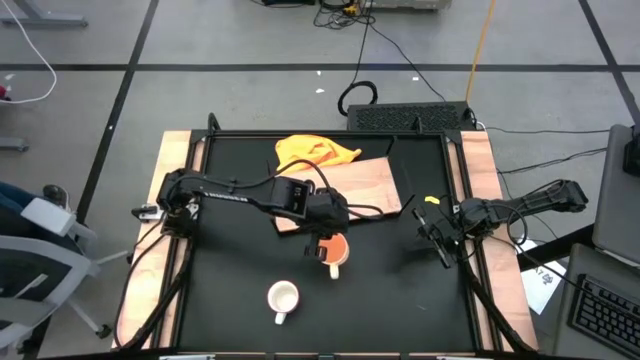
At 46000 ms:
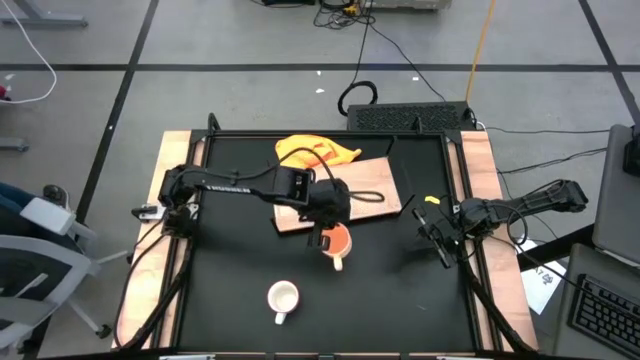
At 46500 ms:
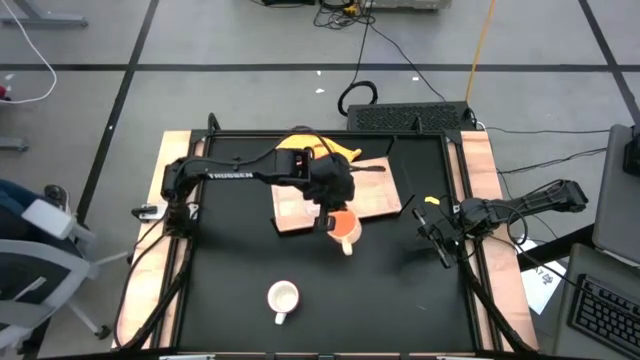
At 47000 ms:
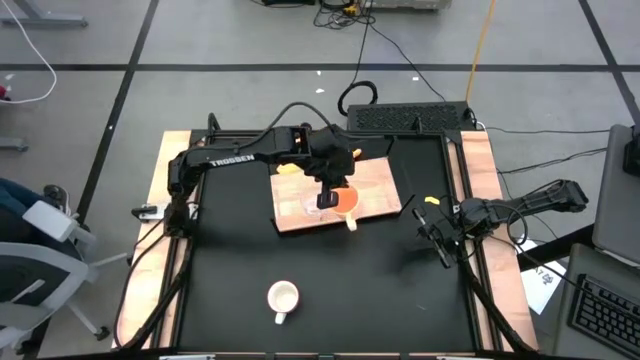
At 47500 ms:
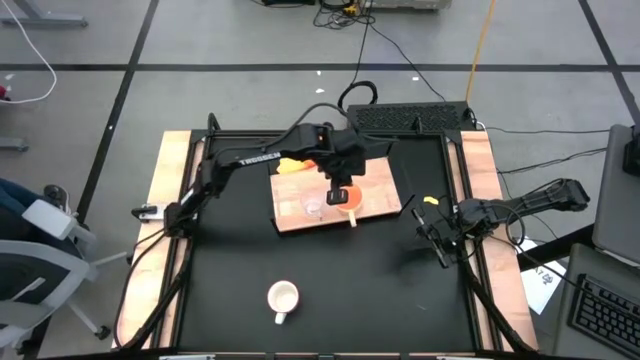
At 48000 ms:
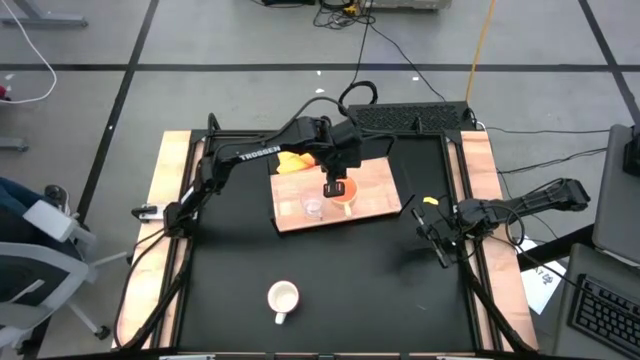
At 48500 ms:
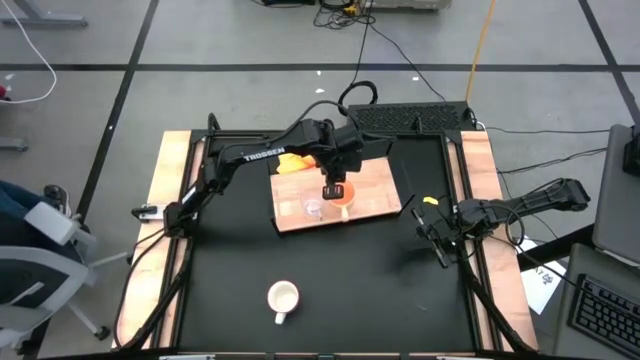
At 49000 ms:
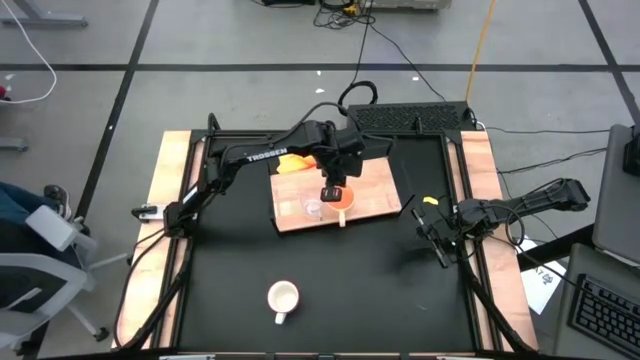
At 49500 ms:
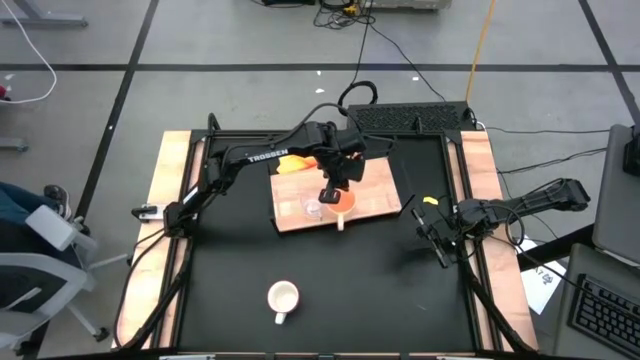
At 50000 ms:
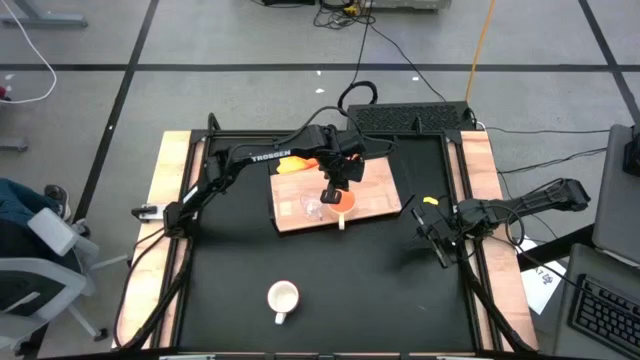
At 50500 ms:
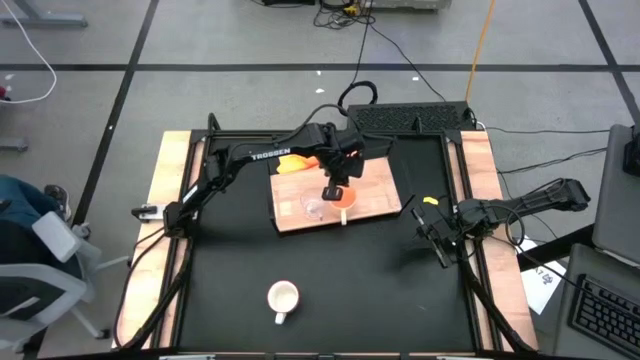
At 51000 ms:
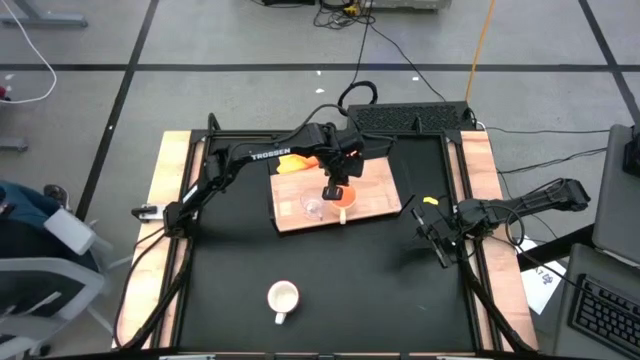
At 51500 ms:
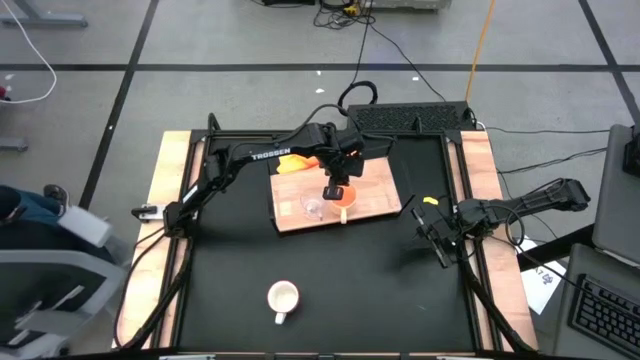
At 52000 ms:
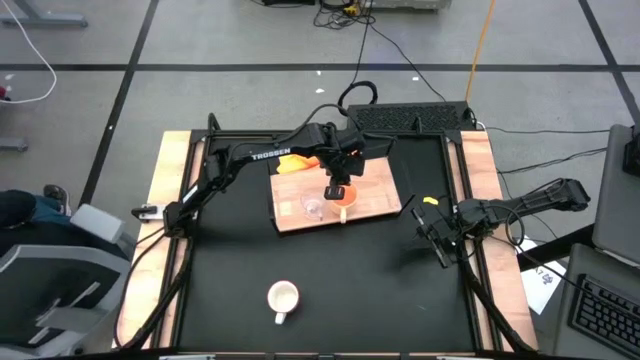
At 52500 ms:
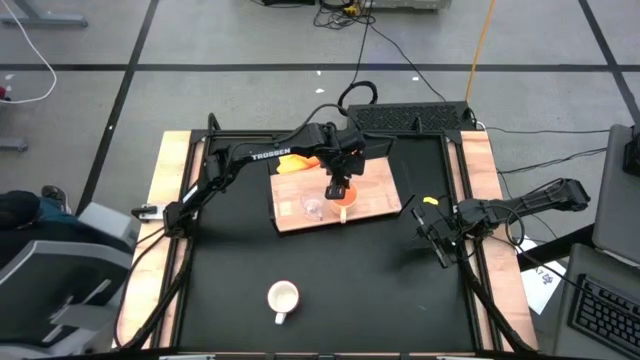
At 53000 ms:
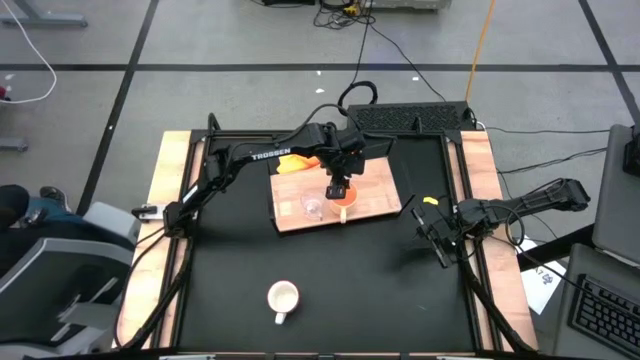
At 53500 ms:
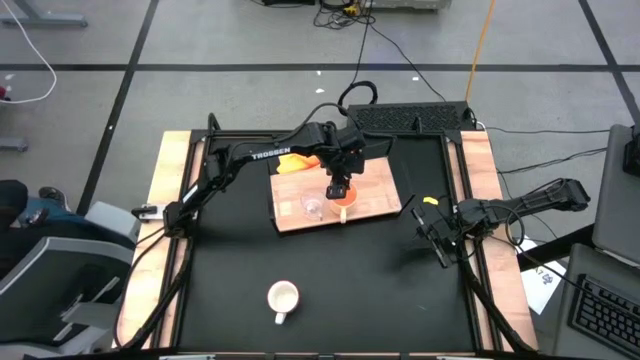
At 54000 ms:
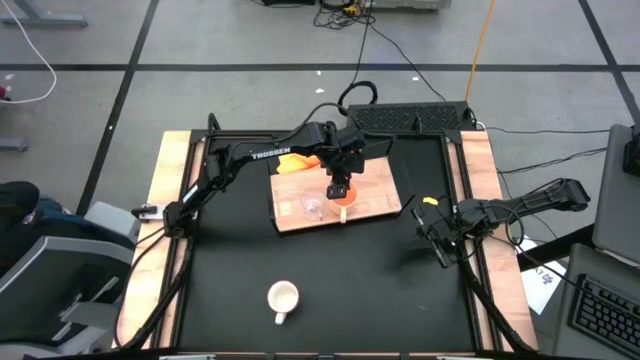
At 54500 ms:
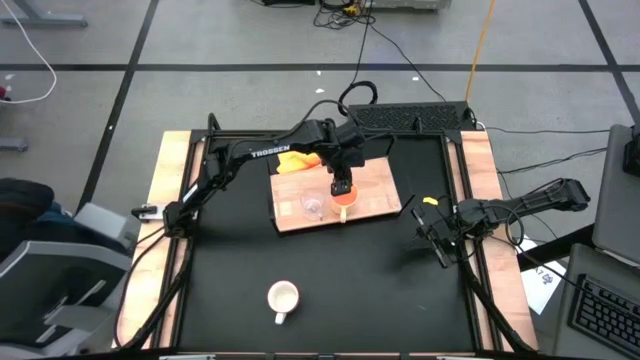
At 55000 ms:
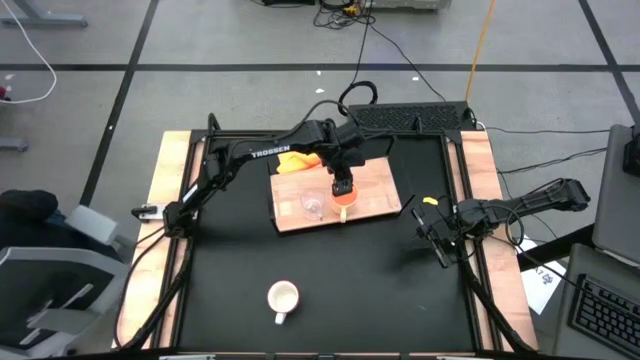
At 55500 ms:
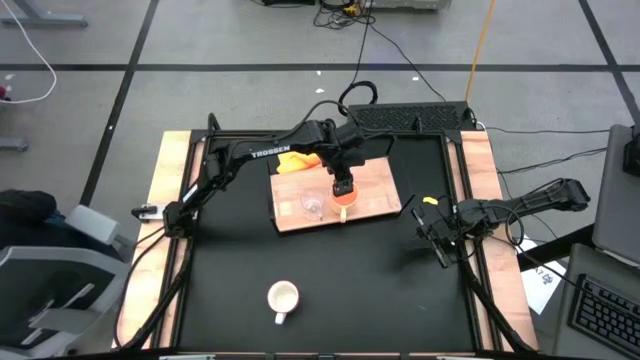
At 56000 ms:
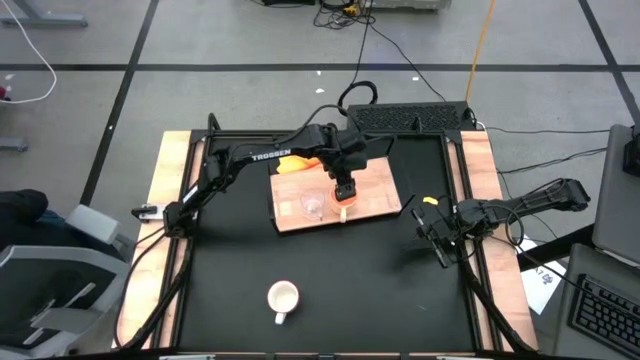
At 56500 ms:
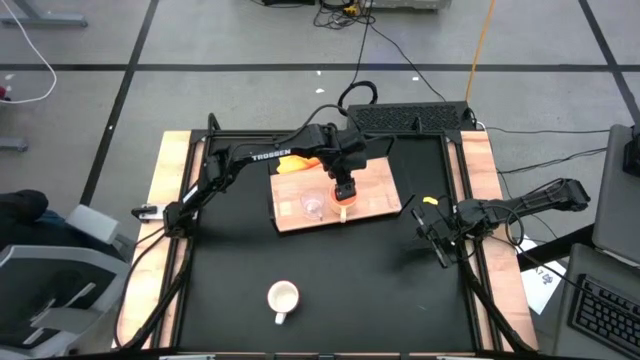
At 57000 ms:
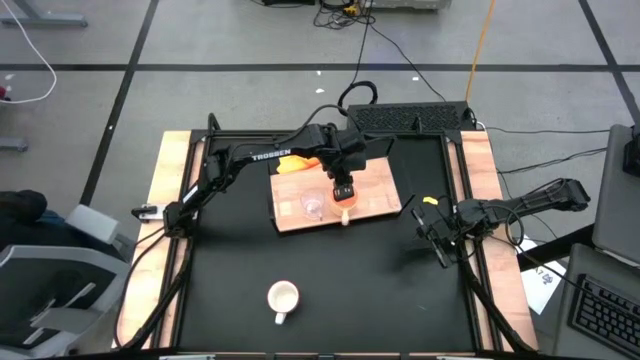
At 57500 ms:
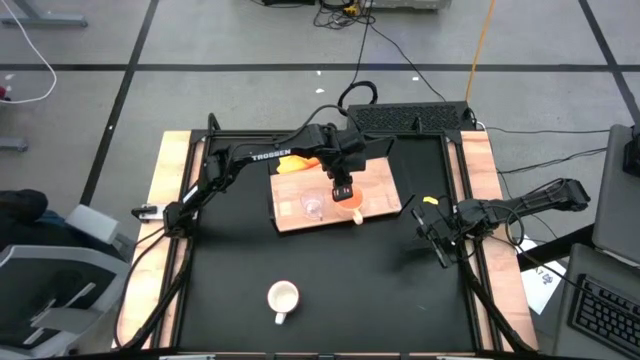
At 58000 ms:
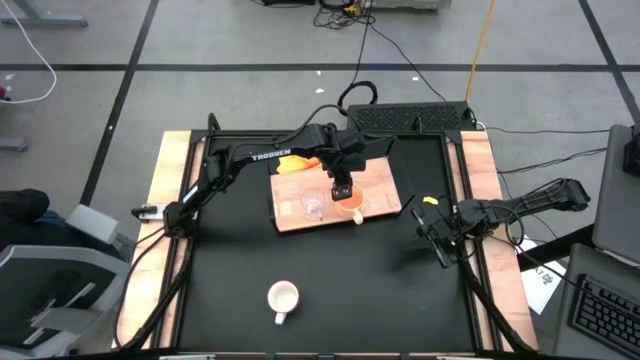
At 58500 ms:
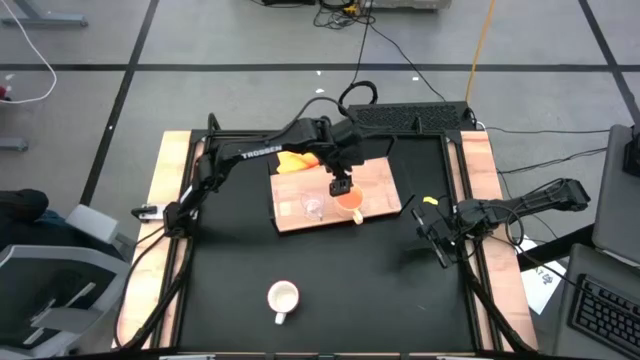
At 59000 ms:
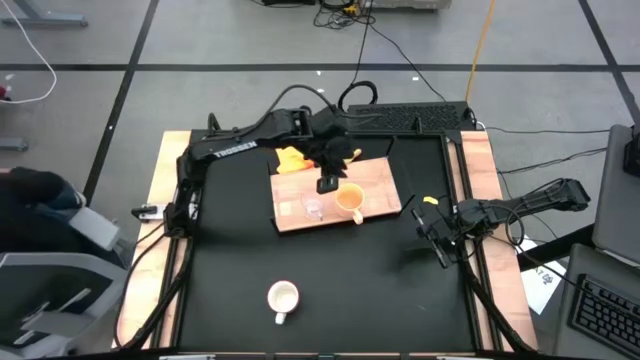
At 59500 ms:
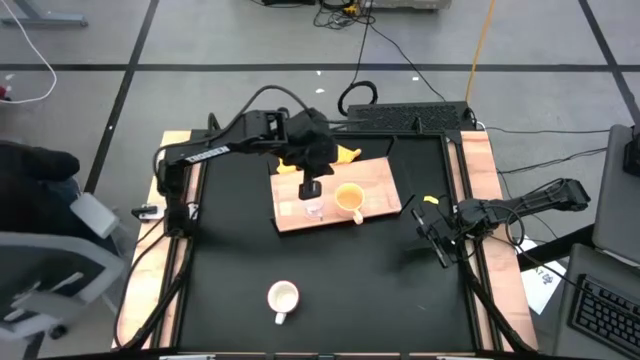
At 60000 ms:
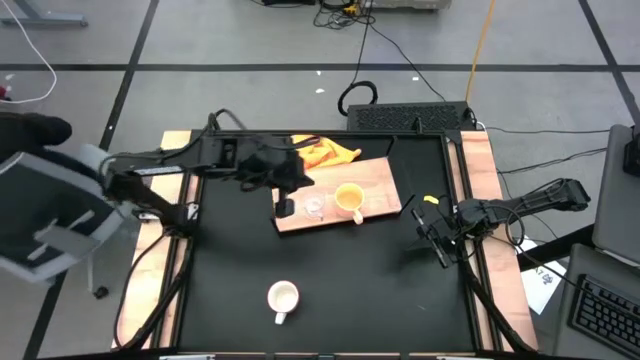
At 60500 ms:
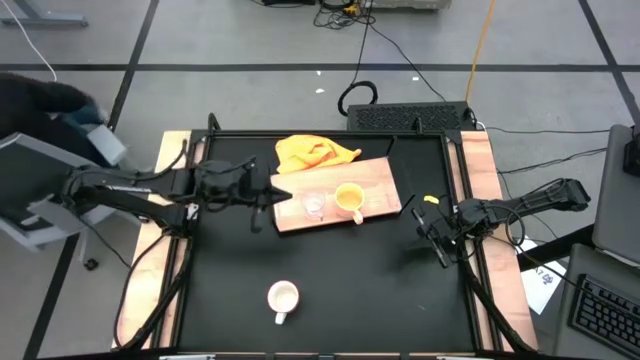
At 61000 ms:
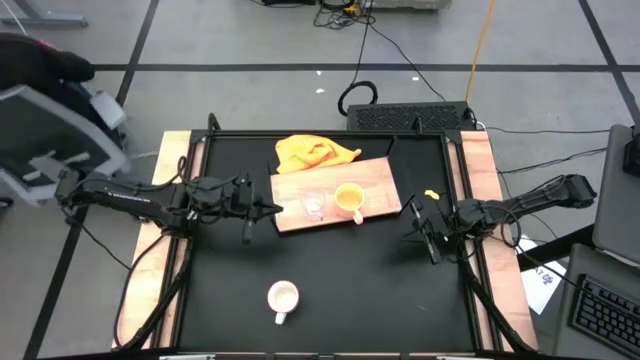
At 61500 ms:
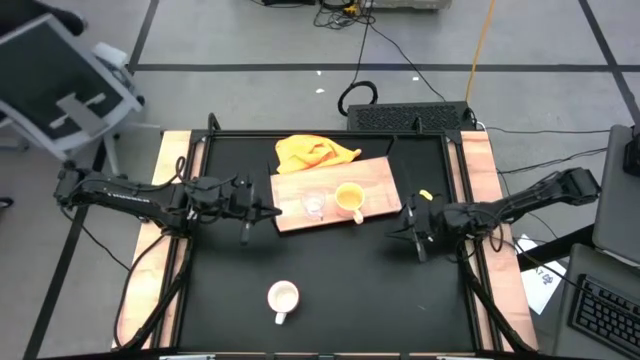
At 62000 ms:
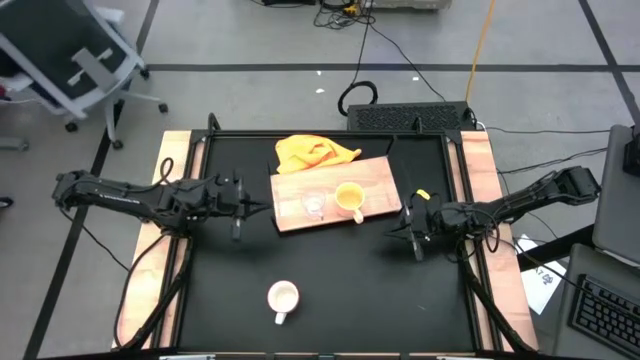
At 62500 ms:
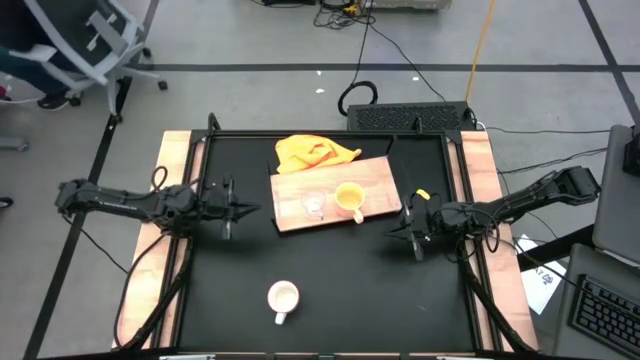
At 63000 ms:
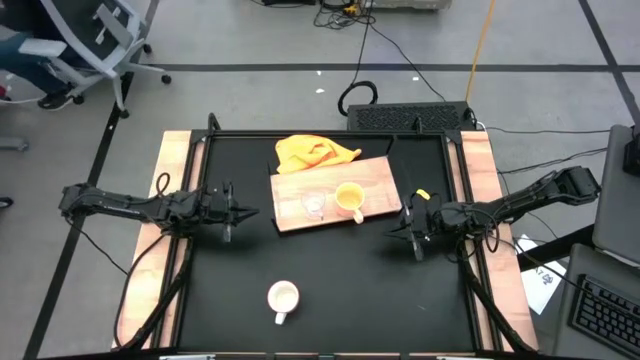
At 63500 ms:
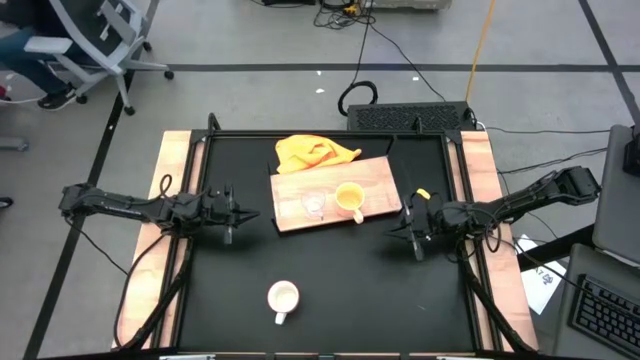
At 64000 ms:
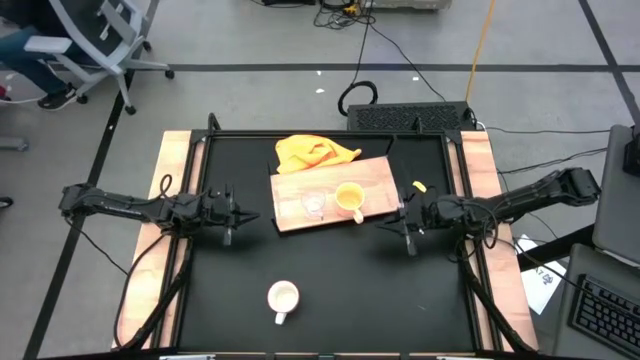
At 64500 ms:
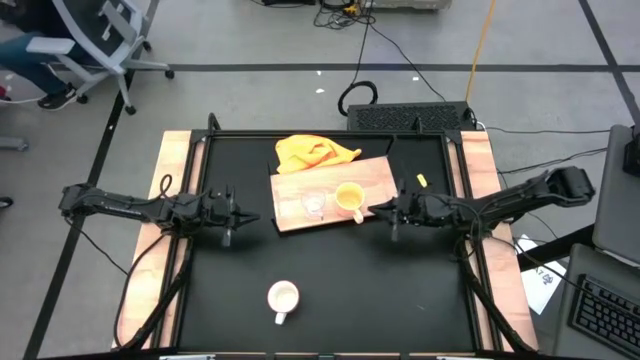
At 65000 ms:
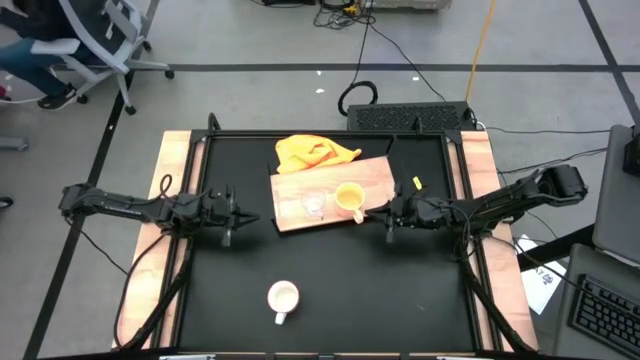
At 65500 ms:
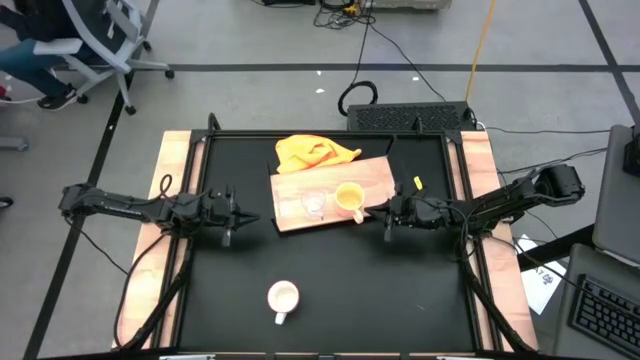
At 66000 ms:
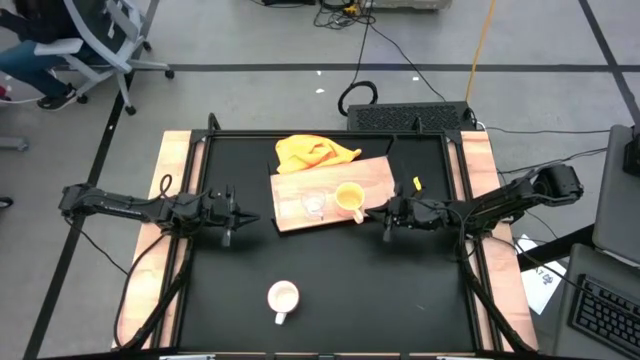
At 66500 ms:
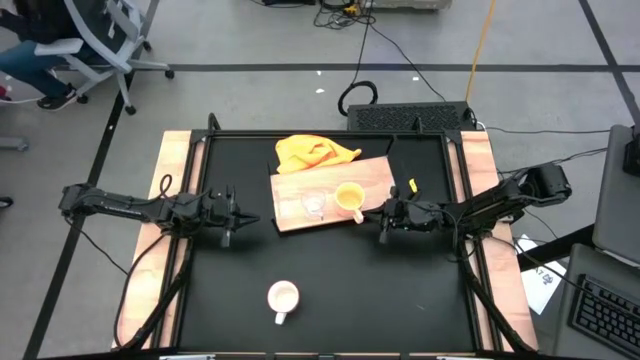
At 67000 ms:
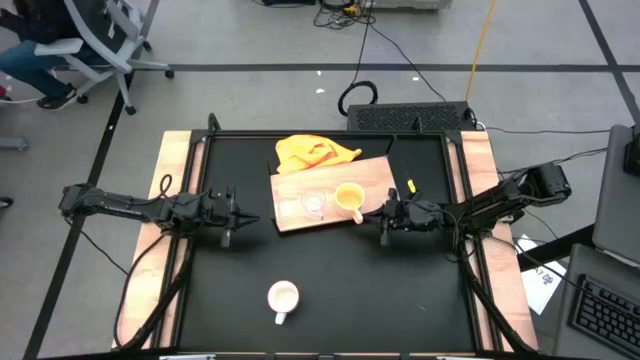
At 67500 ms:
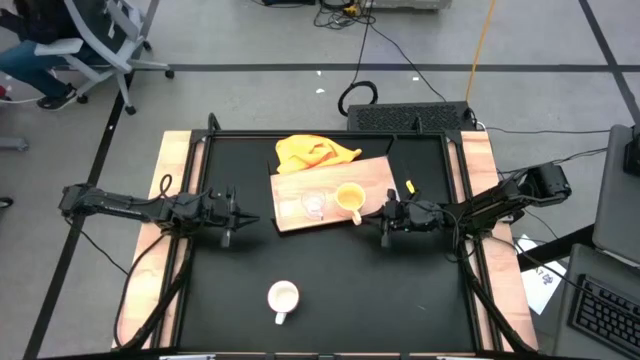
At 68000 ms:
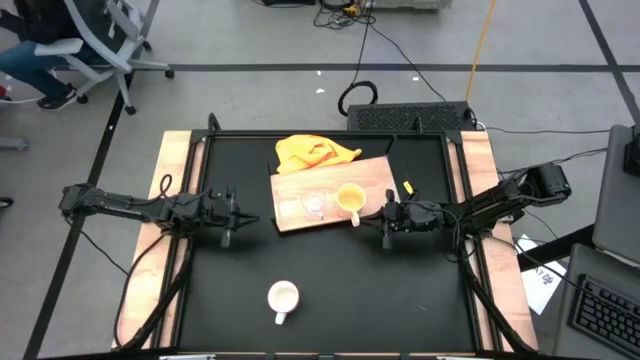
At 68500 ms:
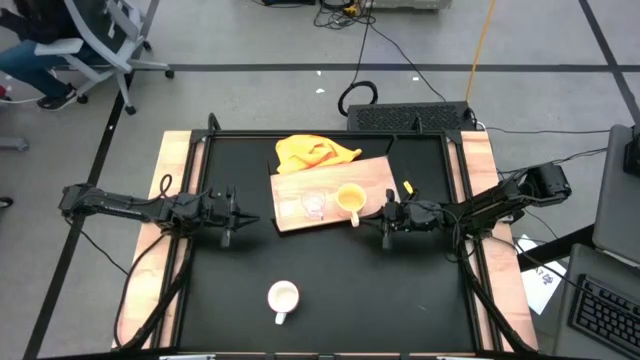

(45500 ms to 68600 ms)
Task: Stack small to large cups/mugs on shelf
Put the orange mug on the shelf
